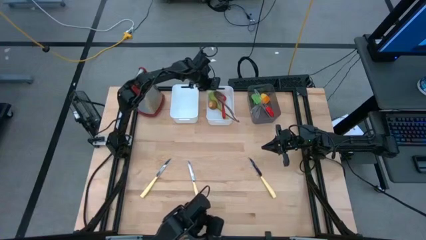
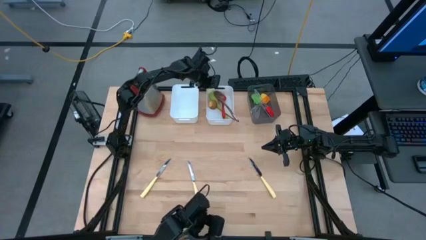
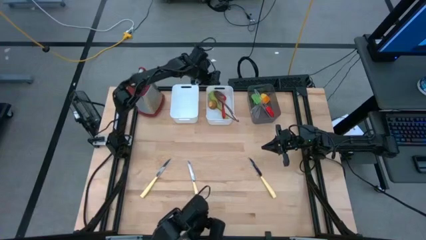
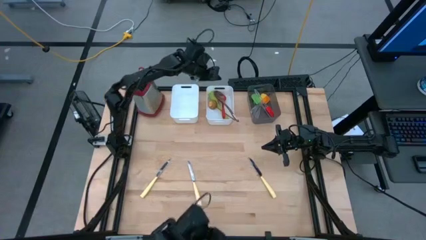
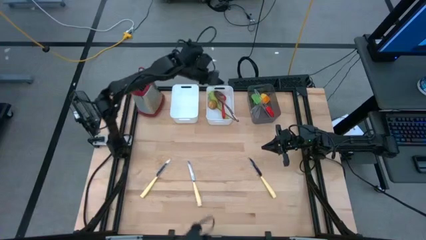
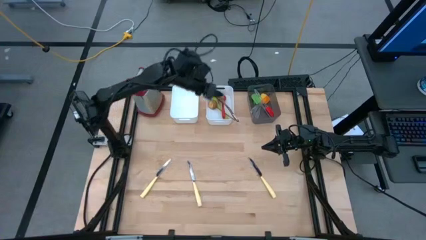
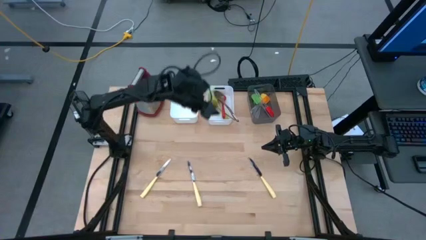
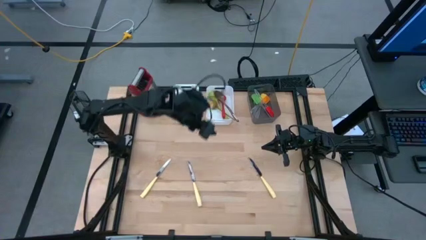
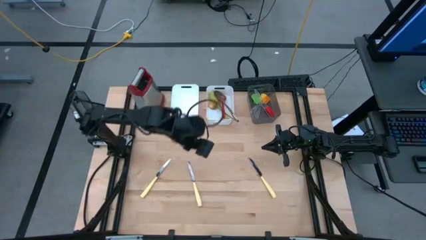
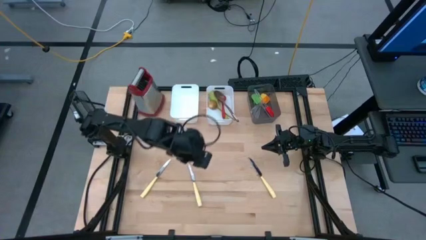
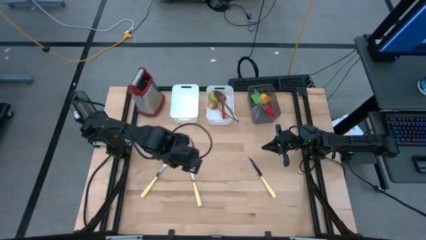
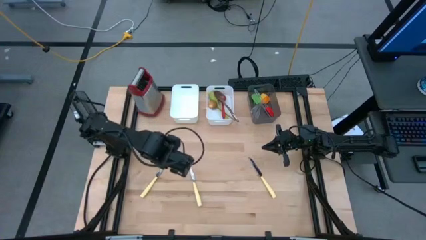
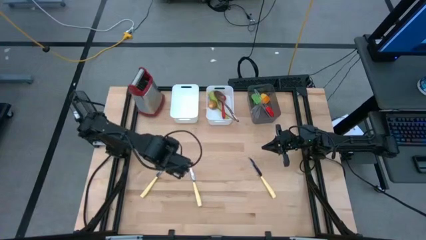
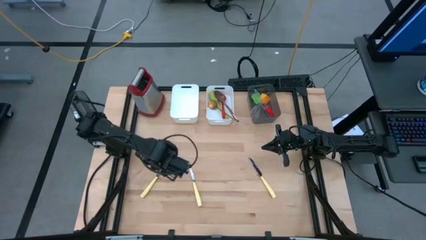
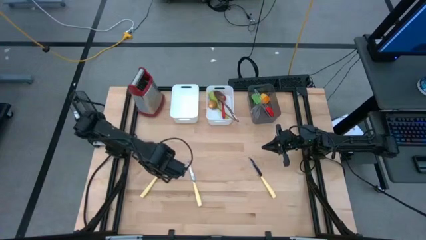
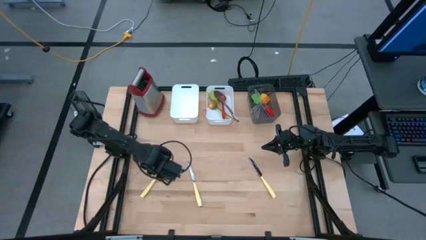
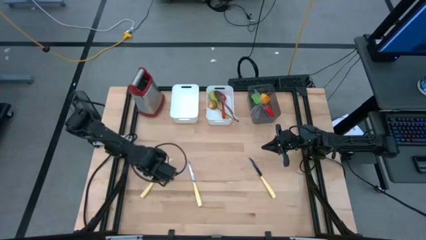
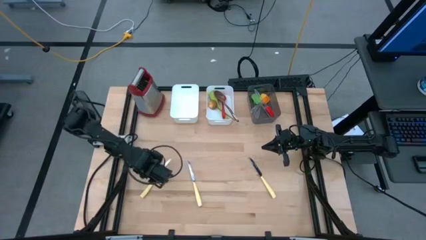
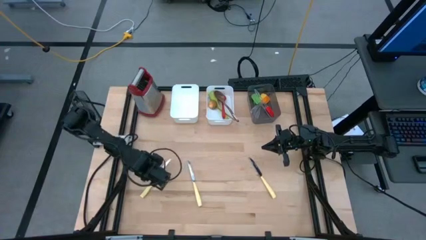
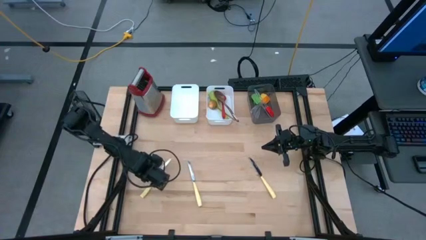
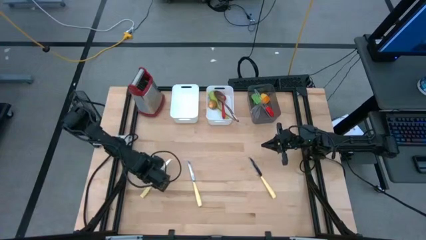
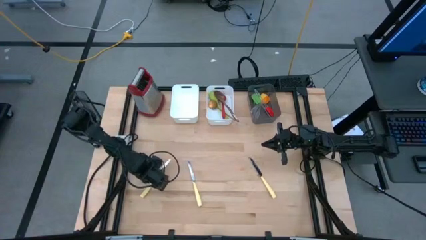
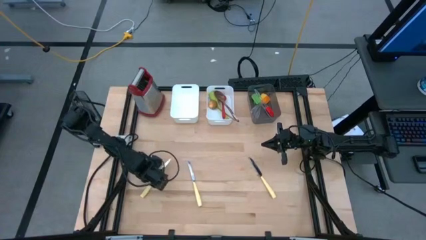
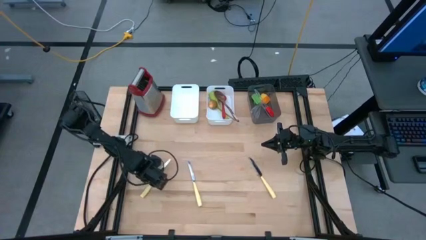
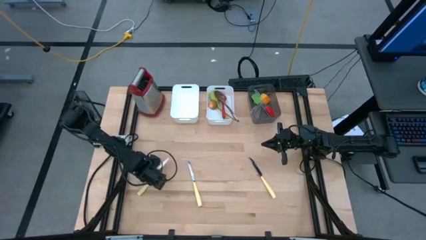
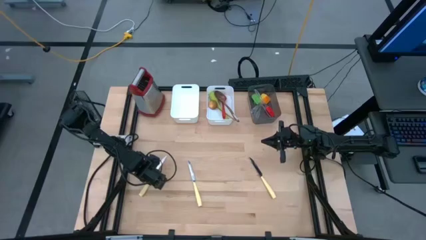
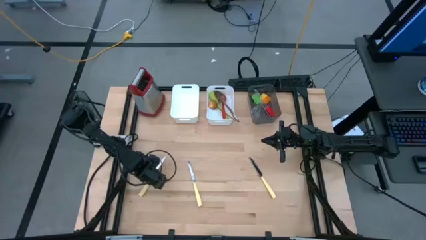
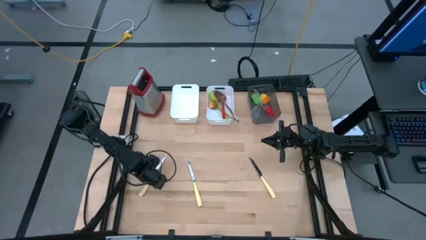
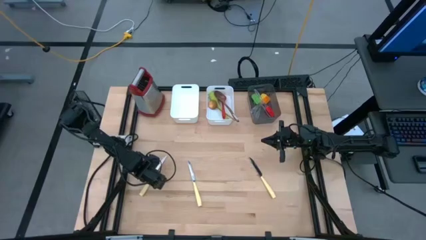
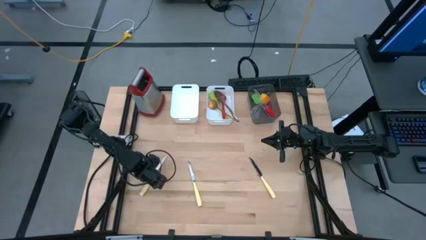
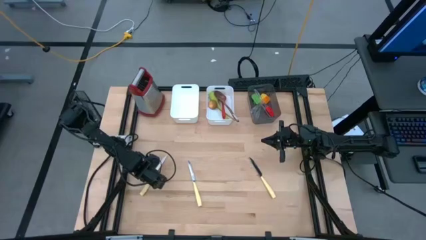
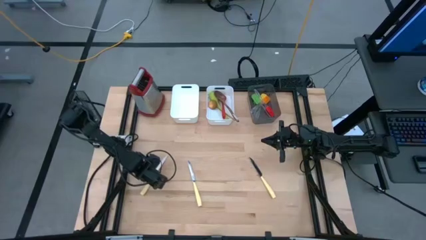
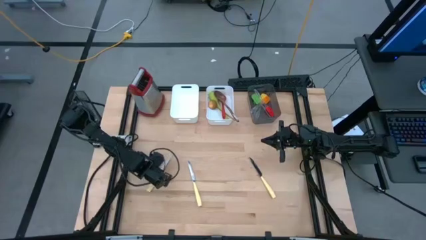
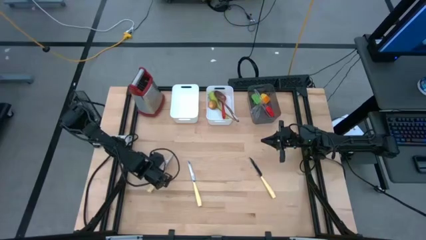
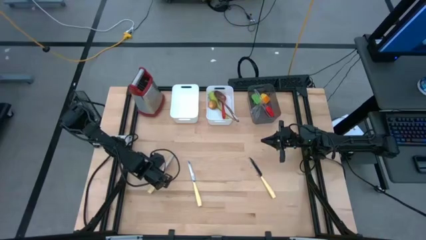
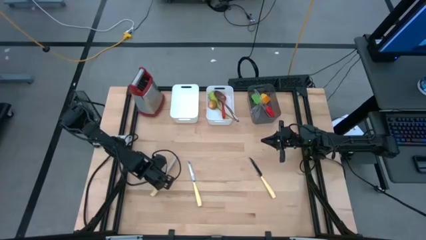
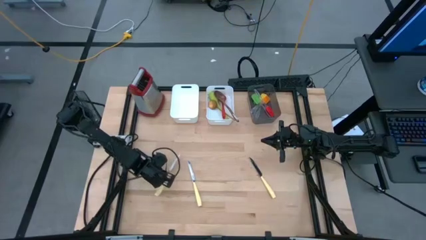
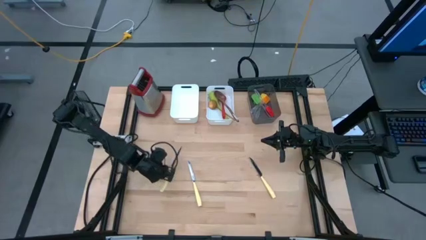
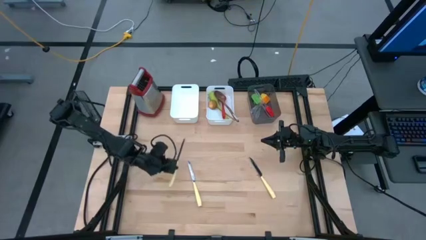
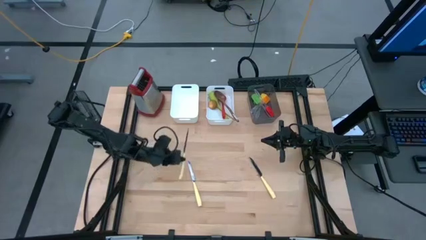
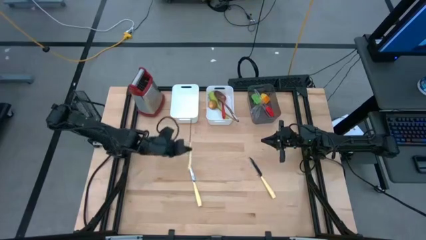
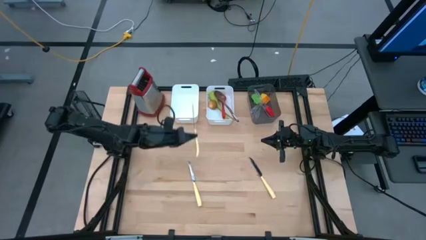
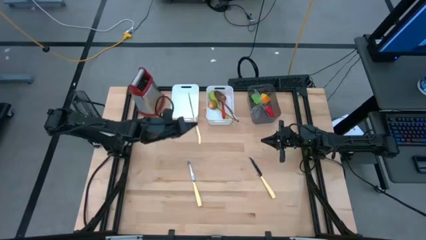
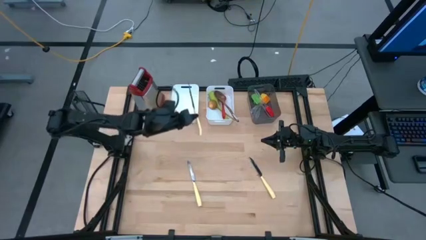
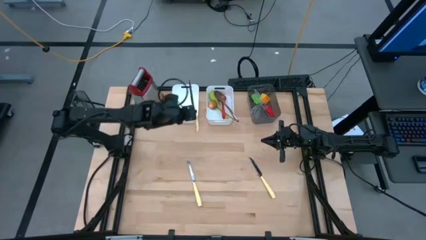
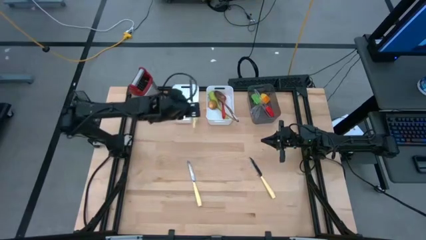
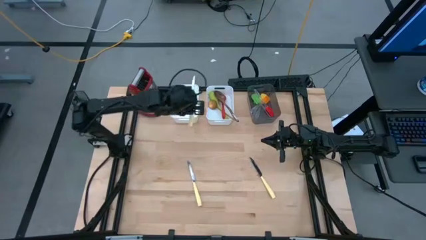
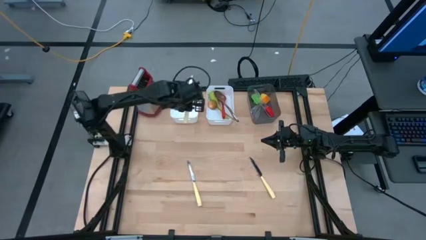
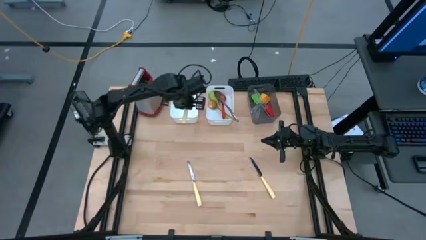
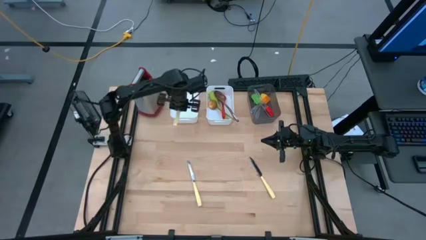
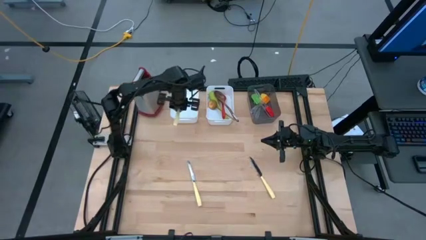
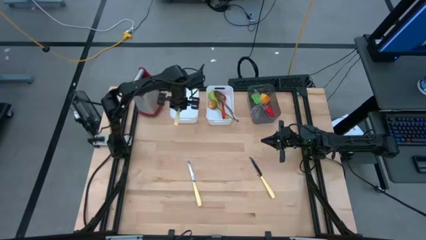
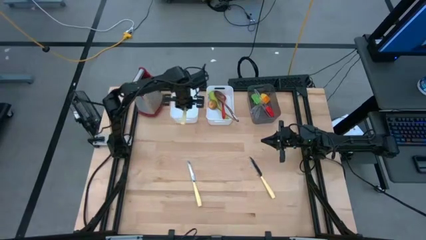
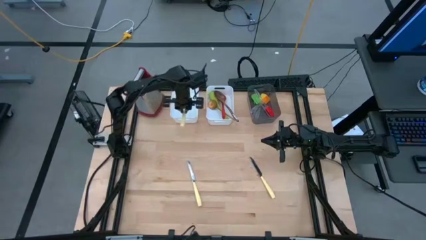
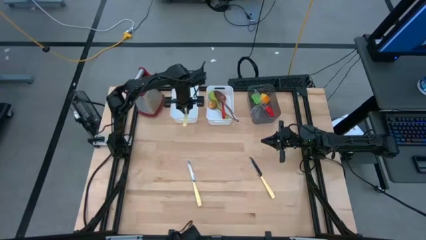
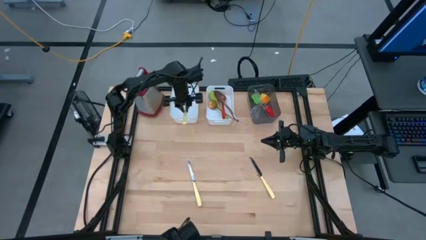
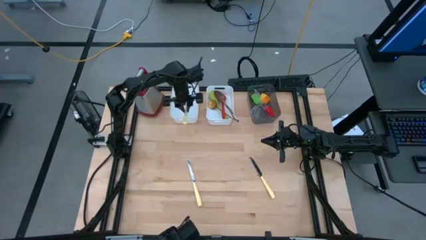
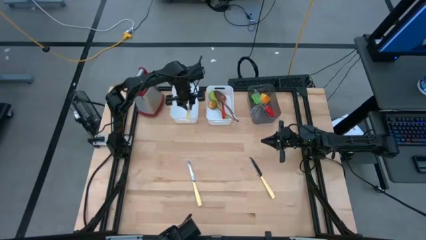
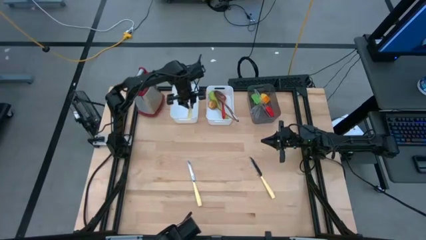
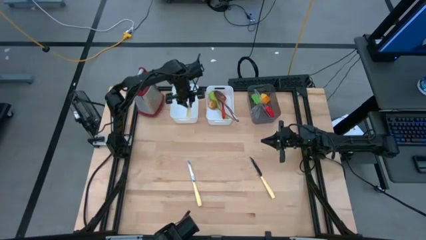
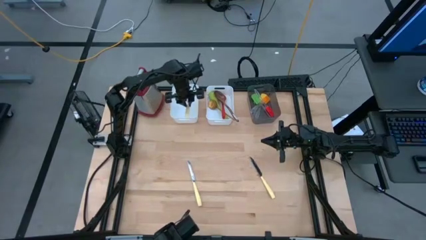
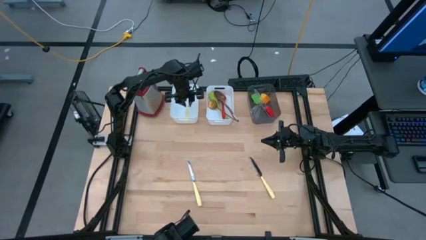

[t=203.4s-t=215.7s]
Task: Pick & Place Kitchen Items
Put the yellow table knife into the left white bin
